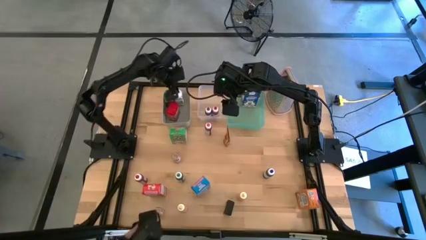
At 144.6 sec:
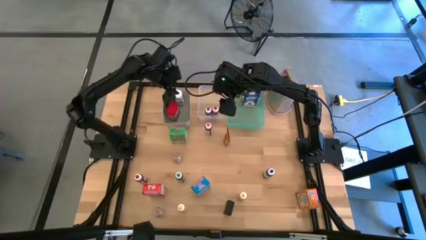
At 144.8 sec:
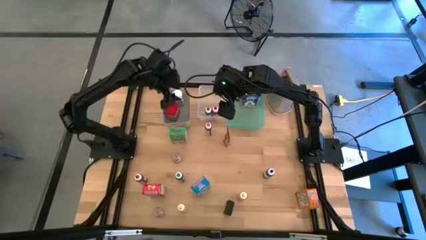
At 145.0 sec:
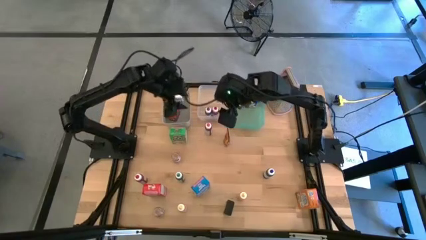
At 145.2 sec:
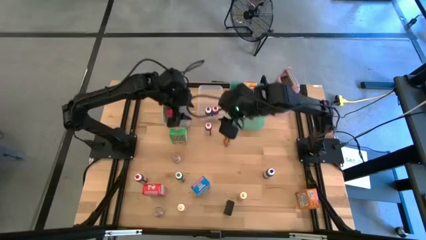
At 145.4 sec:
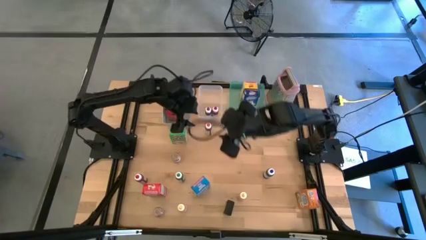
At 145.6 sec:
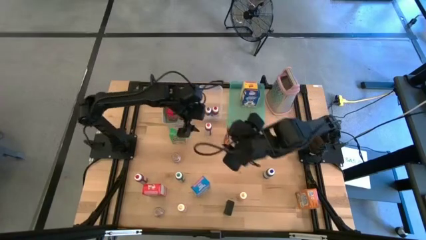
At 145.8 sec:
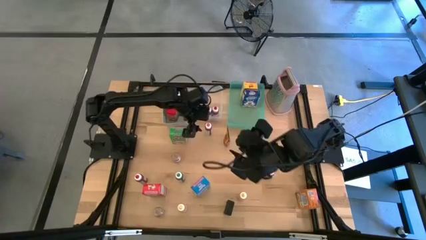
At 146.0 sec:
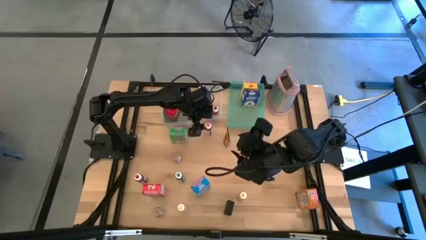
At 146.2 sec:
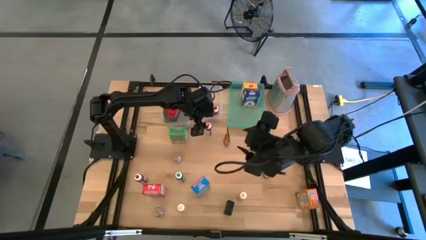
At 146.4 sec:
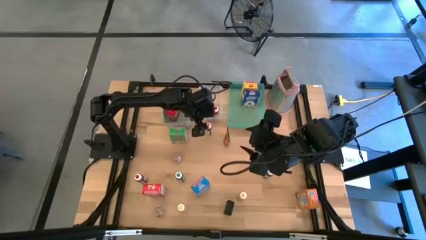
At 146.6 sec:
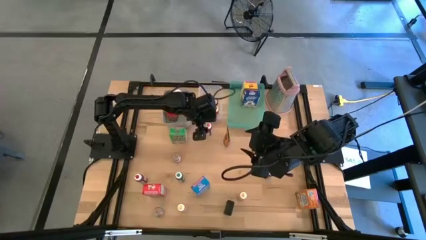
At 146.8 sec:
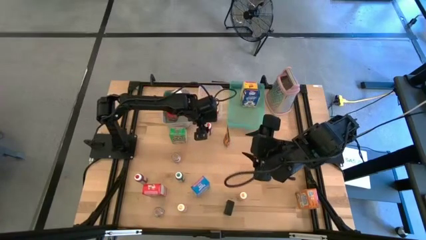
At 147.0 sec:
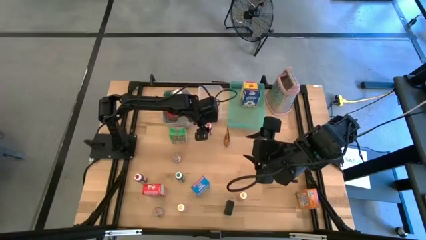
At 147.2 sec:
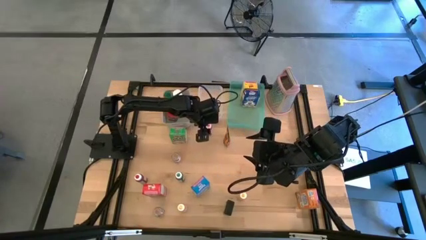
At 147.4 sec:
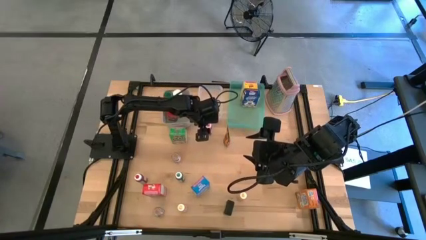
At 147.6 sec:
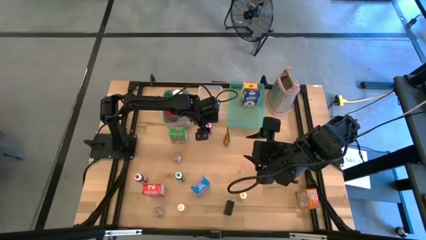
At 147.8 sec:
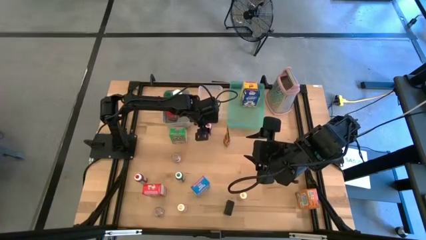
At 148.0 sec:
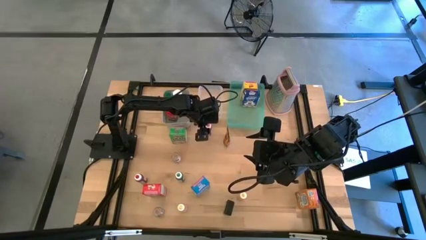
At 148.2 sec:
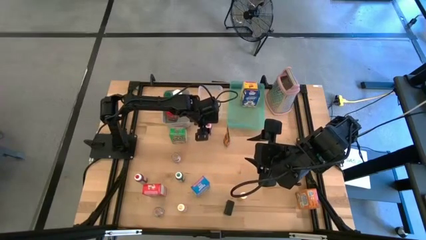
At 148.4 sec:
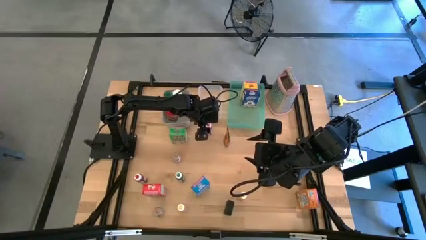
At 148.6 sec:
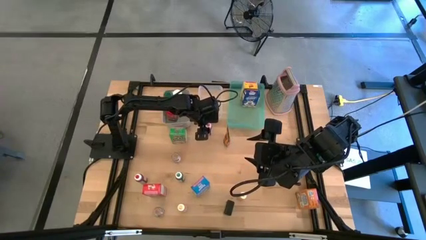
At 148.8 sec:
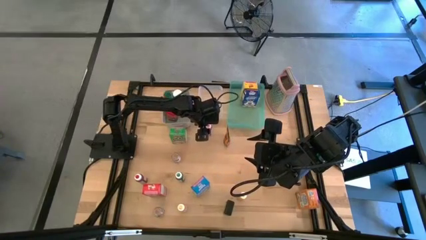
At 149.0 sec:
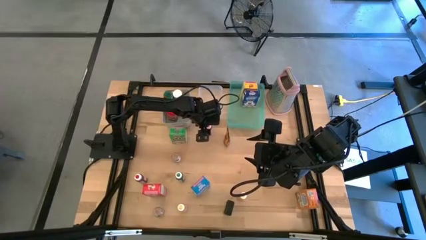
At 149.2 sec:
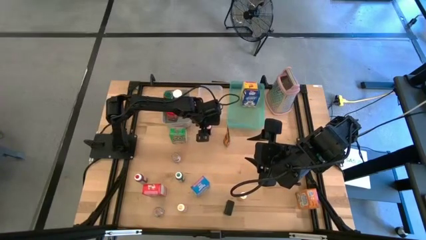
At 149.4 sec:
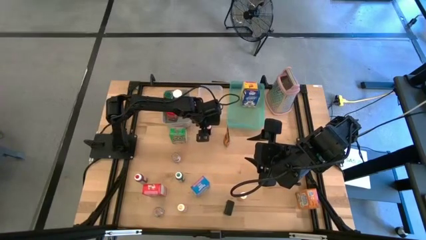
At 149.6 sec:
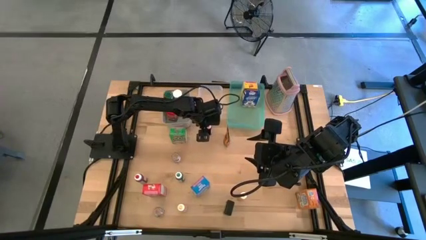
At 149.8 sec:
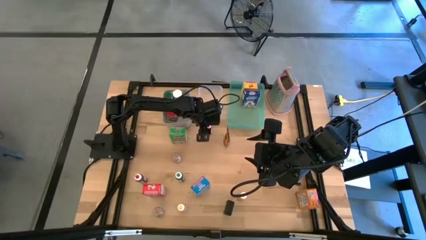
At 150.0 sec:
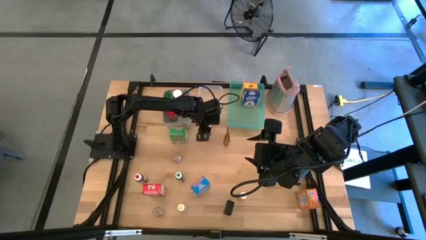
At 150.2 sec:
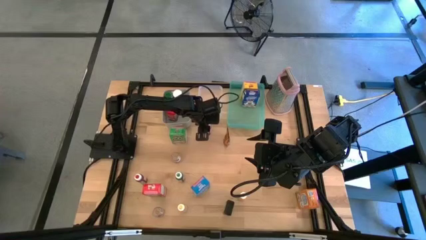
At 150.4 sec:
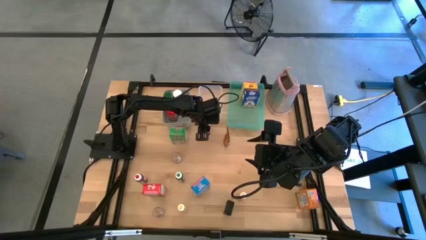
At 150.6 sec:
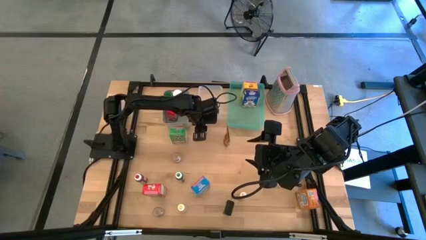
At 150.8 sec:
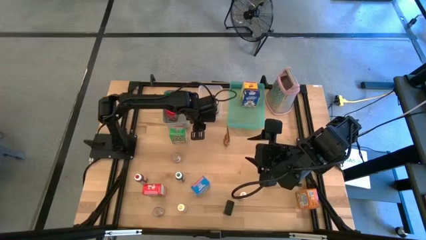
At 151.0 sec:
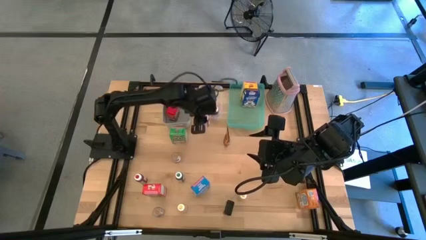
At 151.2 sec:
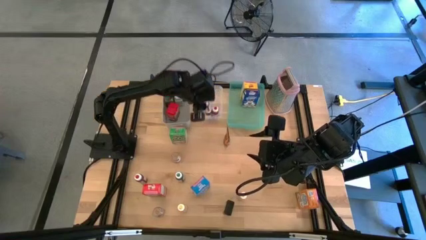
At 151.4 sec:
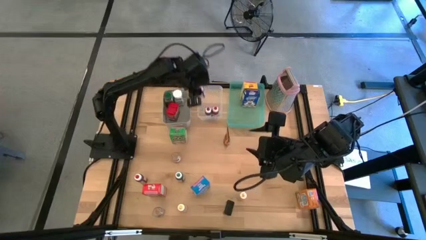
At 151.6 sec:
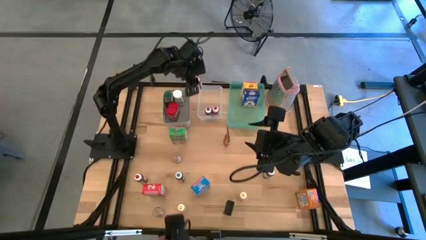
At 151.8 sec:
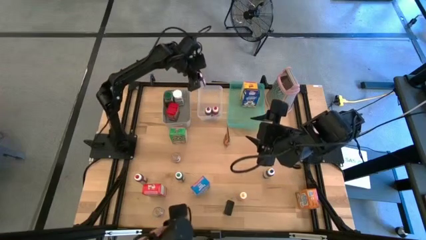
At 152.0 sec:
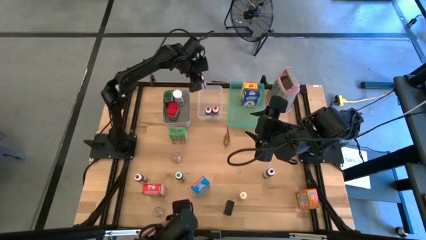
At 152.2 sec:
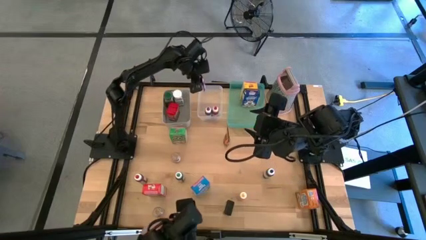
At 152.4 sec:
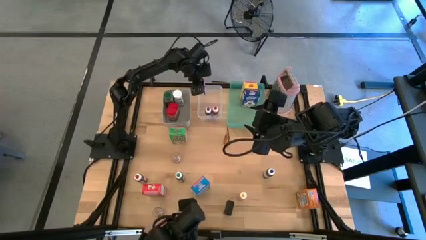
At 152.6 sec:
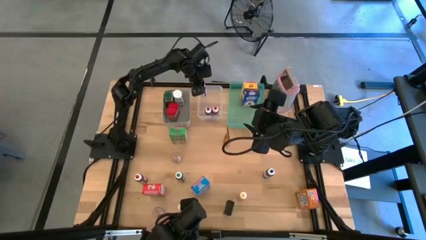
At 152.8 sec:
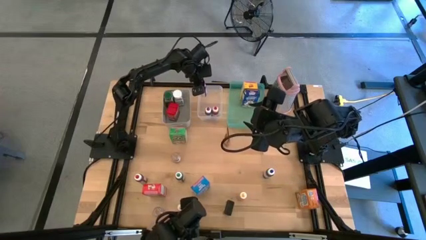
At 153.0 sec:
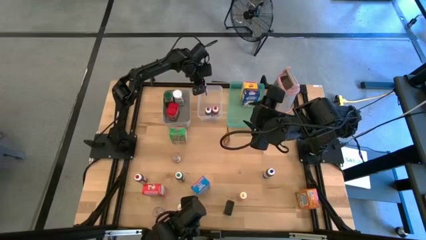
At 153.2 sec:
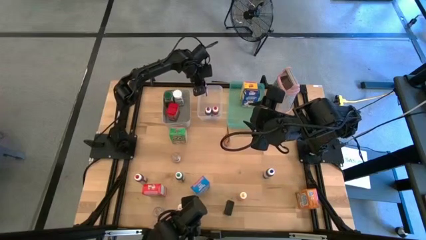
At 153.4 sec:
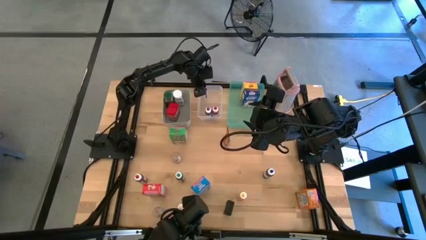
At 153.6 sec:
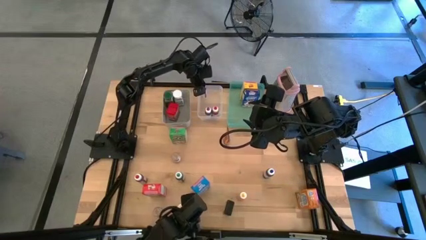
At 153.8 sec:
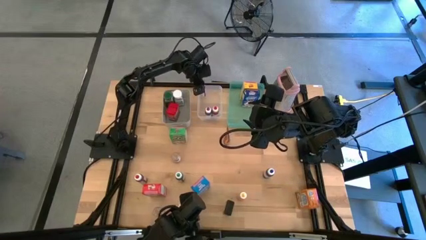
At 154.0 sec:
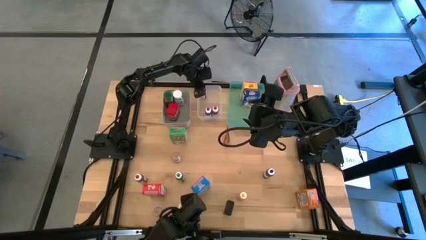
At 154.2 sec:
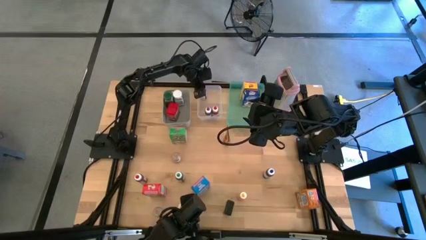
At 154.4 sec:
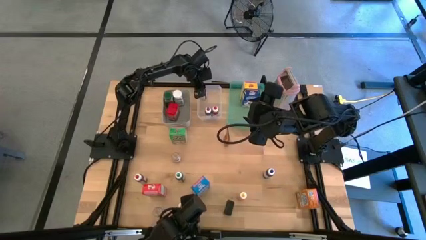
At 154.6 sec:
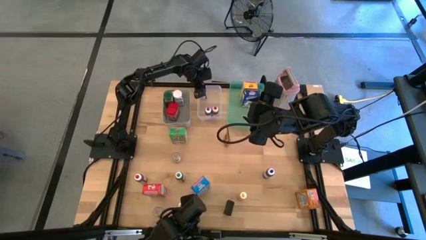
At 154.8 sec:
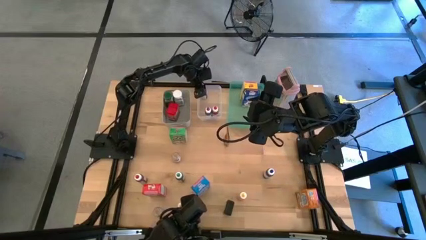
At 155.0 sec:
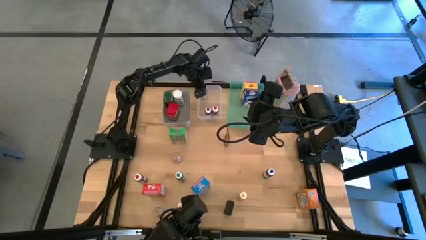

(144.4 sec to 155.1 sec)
Task: Pick & Place Kitchen Items
Put the pink food coloring bottle into the transparent bin
